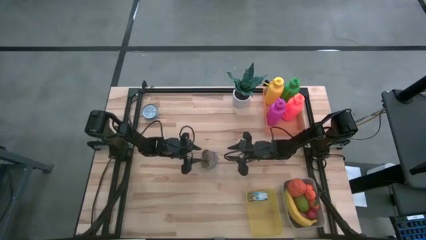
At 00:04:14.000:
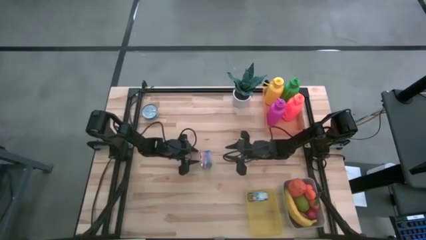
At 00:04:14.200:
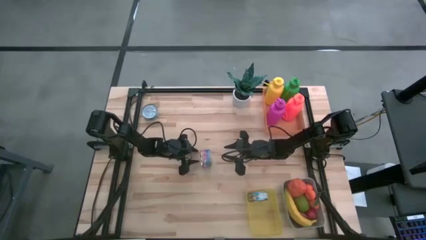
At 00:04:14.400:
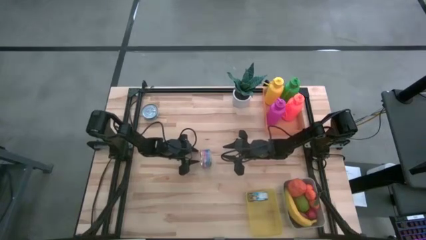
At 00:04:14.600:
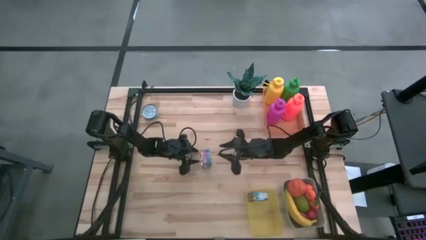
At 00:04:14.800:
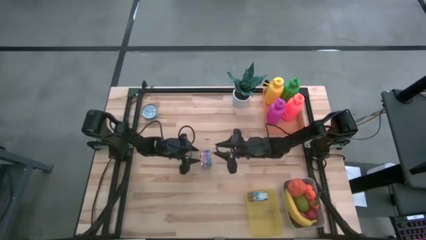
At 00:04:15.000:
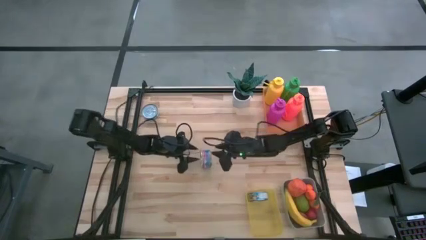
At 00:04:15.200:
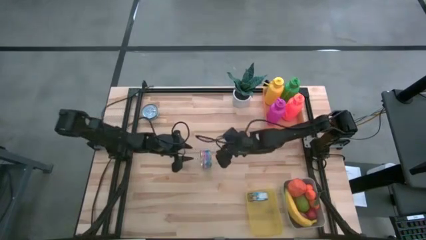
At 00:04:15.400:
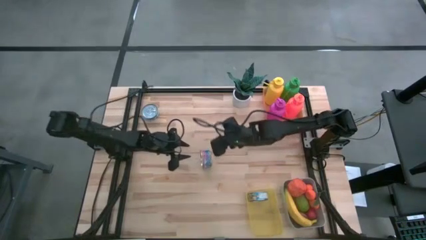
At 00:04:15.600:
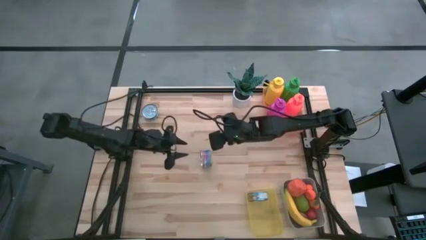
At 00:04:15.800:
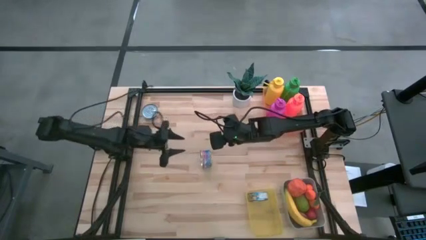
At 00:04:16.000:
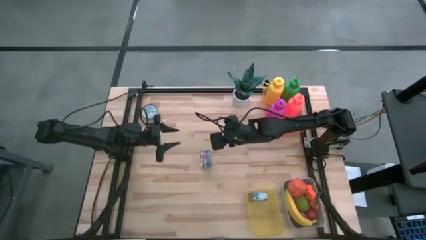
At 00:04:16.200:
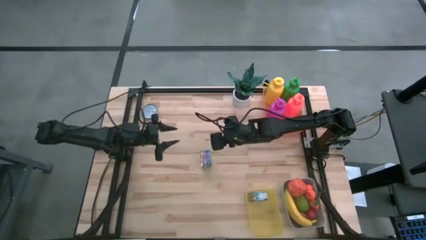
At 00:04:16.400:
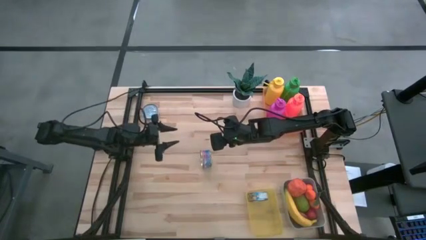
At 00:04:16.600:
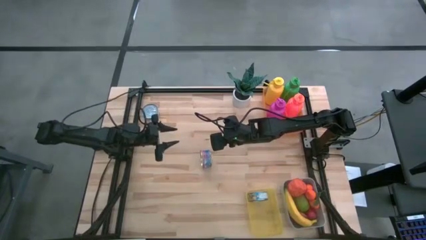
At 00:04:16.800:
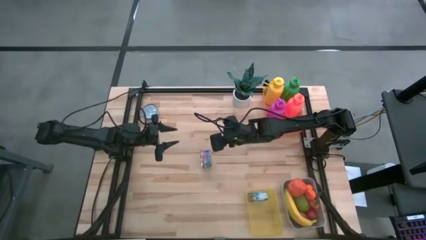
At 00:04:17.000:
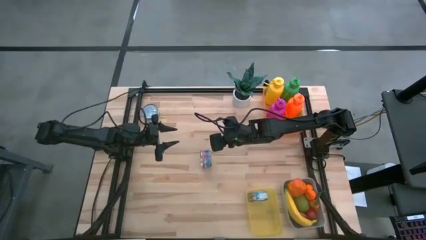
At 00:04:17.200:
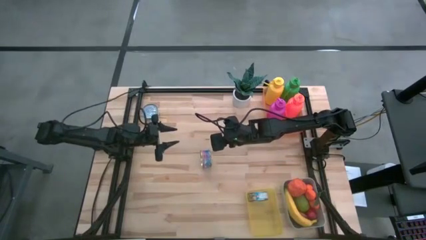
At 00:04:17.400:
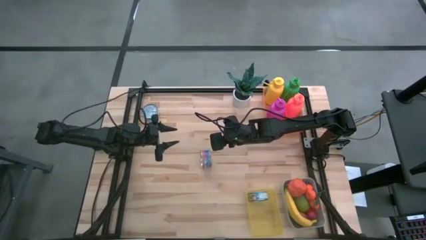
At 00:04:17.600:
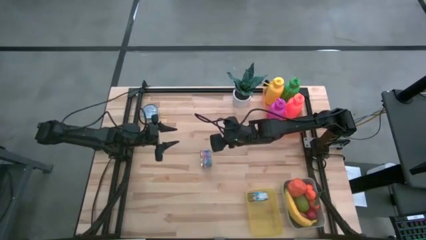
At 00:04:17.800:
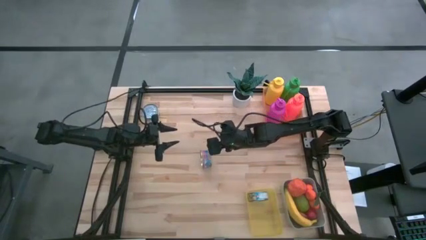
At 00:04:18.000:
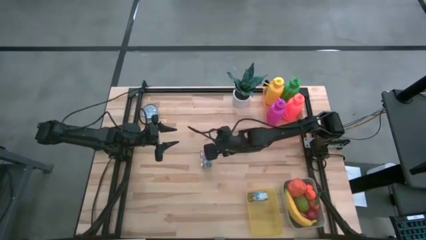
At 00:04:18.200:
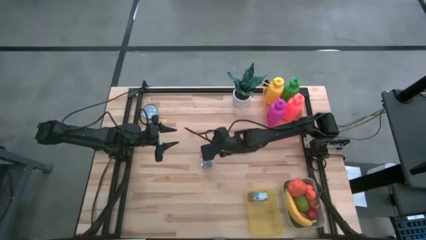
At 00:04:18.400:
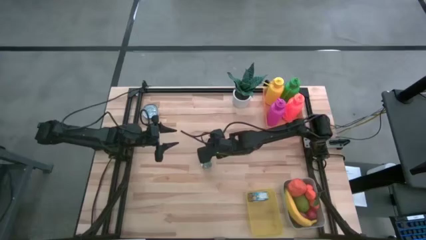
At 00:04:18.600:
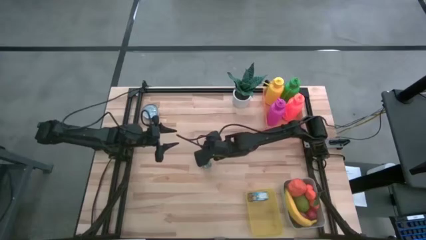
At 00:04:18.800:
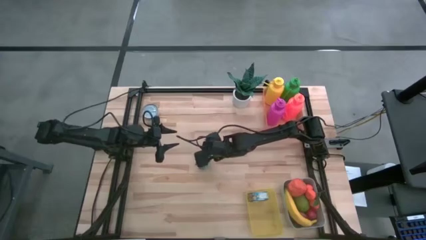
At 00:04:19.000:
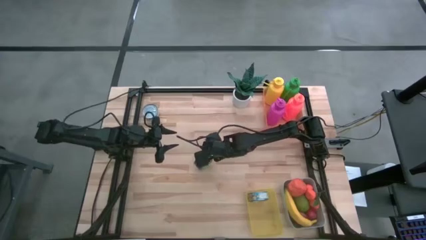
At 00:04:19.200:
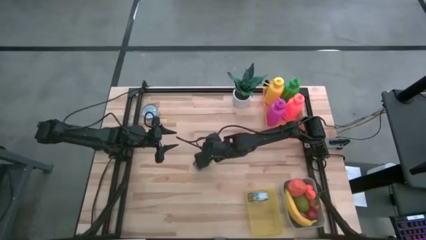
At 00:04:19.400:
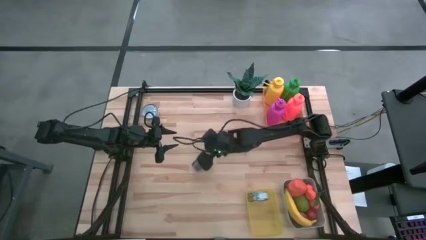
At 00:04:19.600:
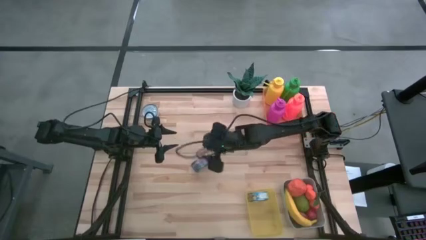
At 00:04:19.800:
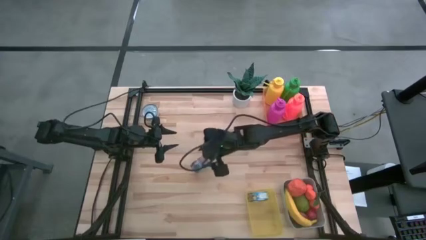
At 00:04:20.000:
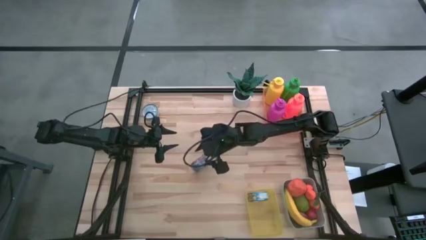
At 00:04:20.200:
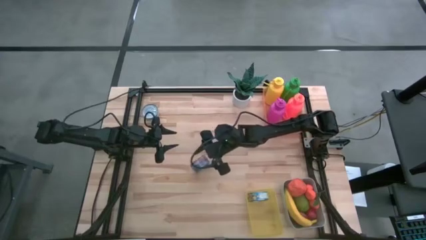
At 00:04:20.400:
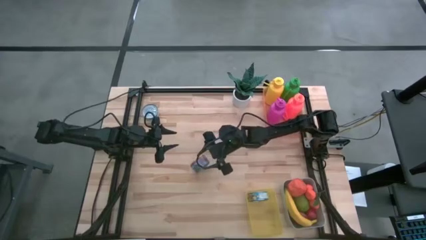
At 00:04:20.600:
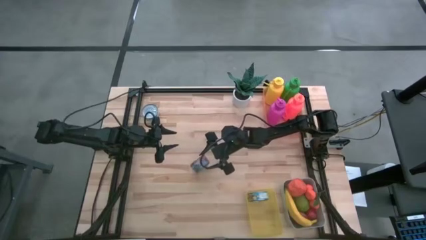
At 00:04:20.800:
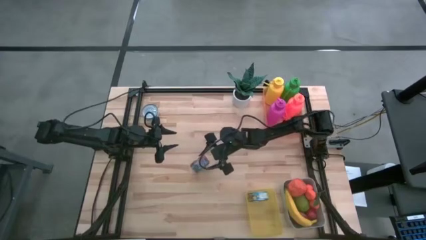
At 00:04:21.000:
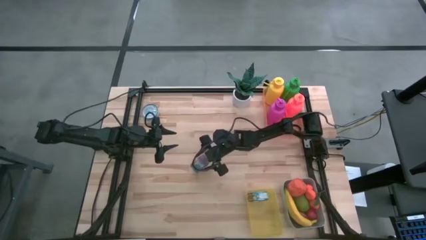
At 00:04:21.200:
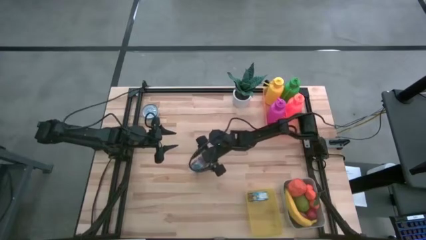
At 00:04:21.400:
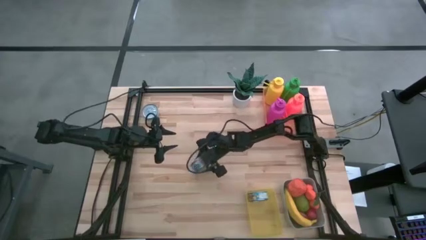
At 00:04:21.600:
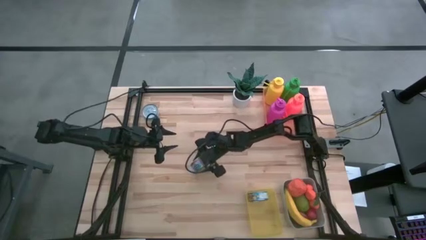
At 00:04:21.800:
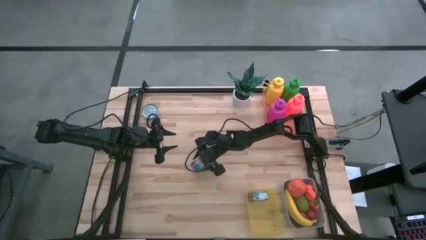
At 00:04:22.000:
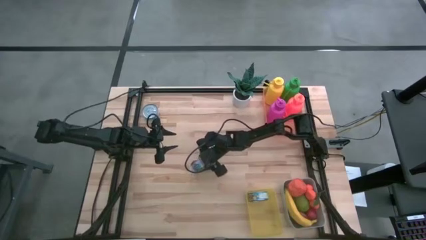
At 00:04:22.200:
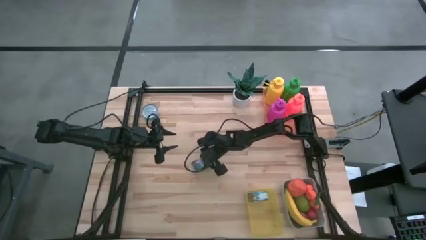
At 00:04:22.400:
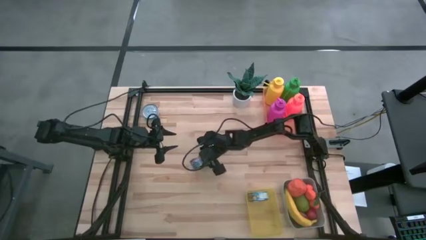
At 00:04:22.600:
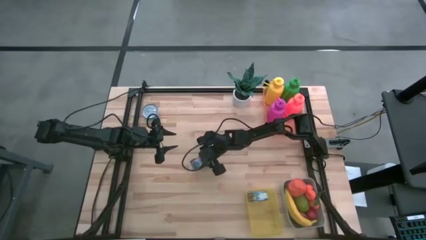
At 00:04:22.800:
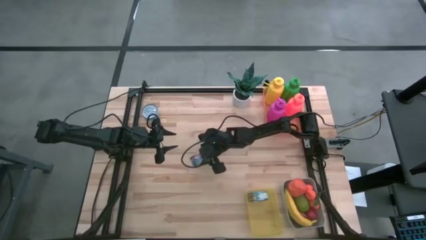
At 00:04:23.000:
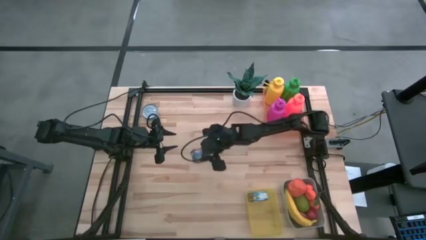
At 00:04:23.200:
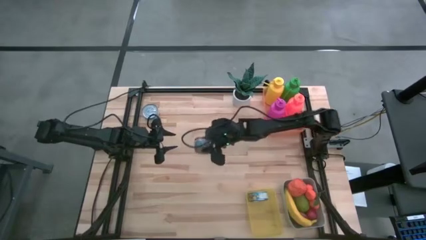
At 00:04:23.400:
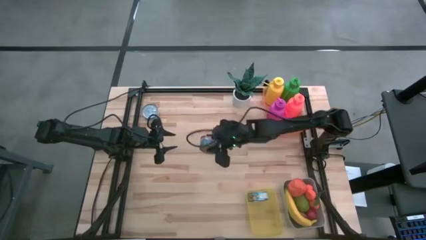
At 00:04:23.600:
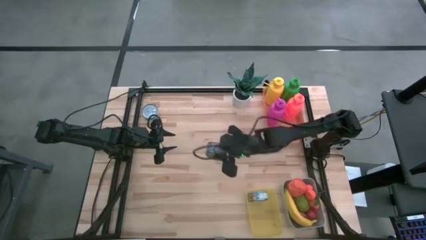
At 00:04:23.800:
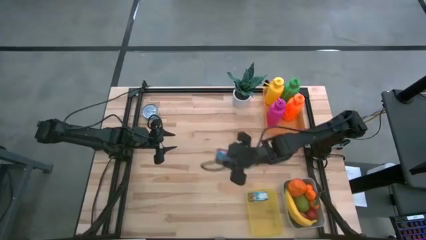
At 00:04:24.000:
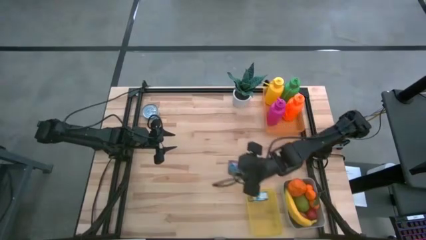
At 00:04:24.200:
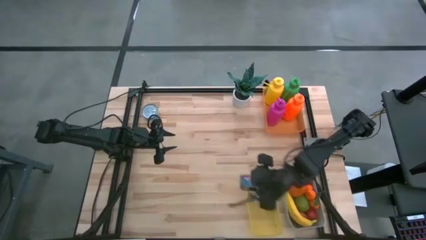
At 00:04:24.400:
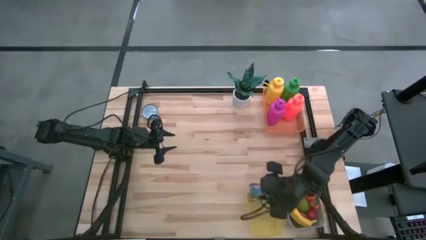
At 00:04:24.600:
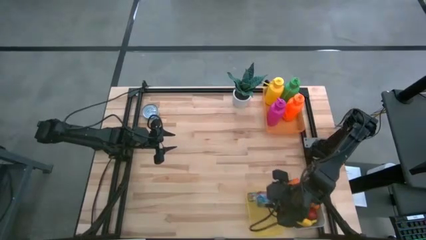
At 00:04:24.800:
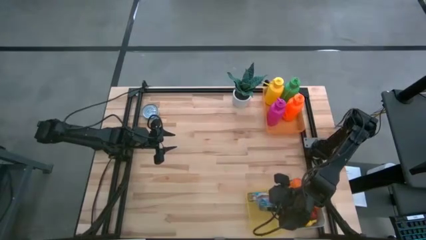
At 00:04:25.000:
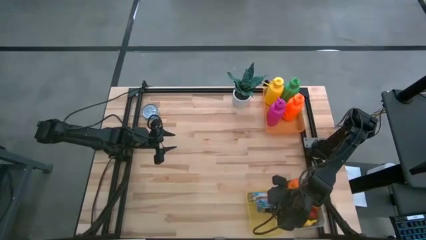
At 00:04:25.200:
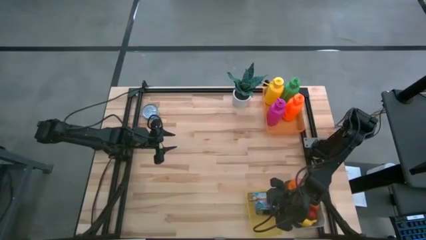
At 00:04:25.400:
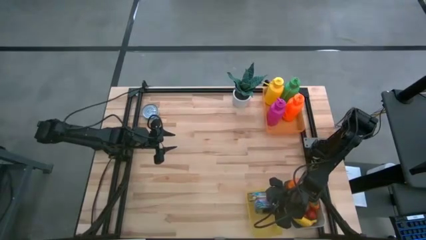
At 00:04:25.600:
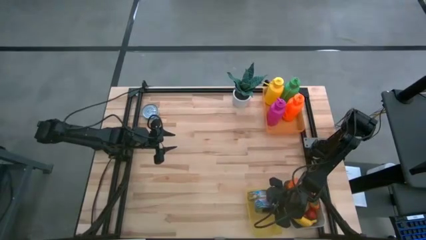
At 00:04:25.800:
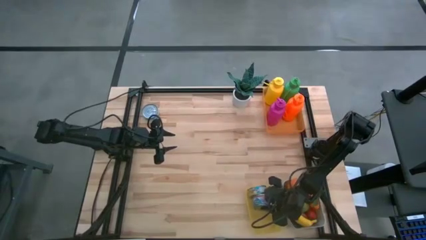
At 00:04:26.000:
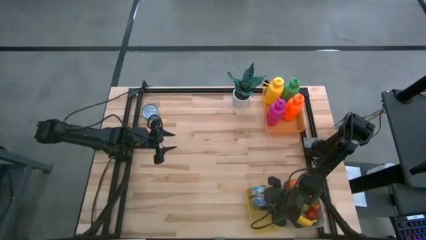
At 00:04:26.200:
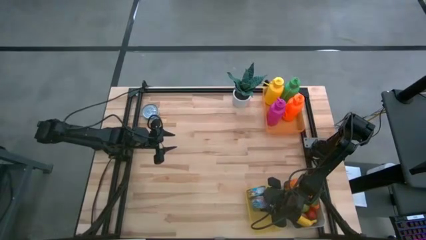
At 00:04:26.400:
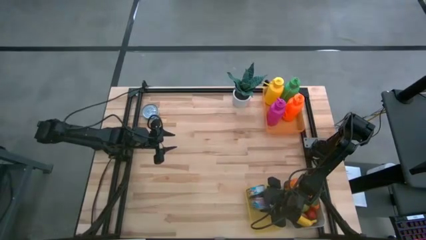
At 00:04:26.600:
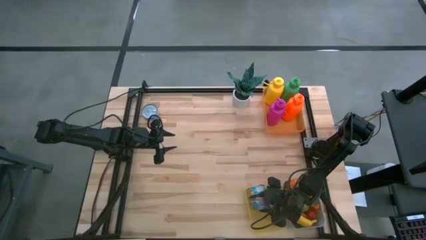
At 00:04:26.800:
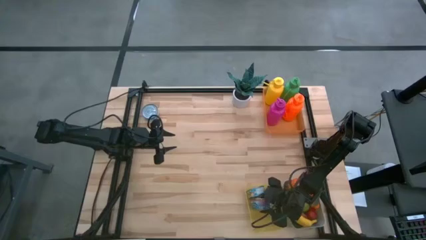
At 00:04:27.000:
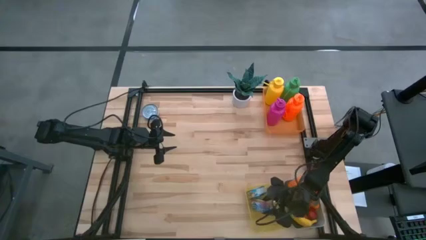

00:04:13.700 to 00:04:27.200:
Task: Pick & Place Food Item
Put the blue and pink tuna can into the yellow bin
